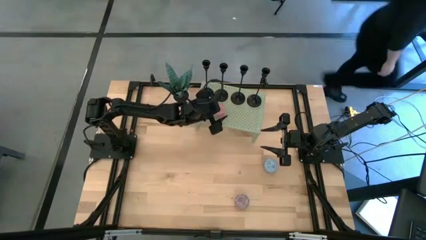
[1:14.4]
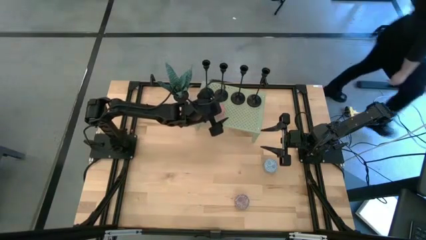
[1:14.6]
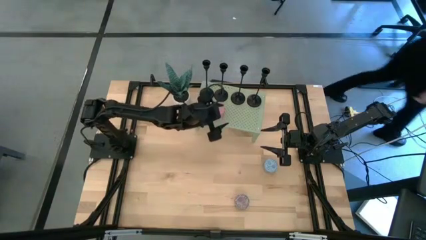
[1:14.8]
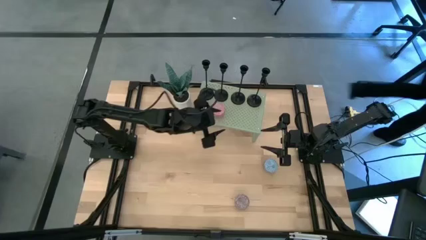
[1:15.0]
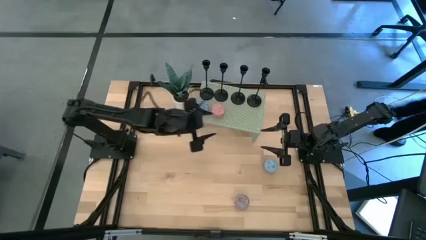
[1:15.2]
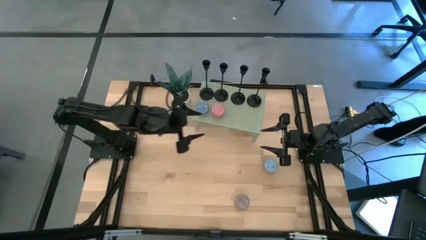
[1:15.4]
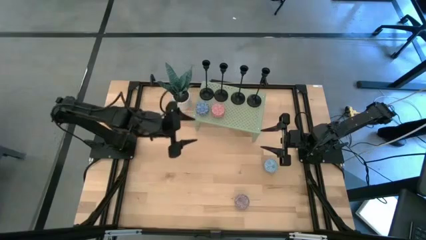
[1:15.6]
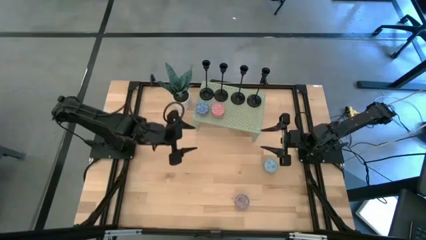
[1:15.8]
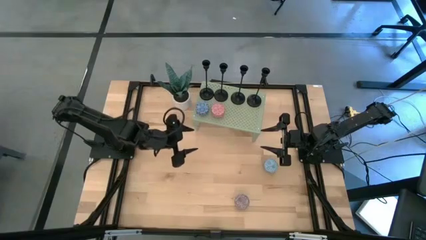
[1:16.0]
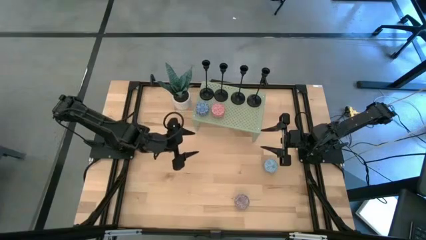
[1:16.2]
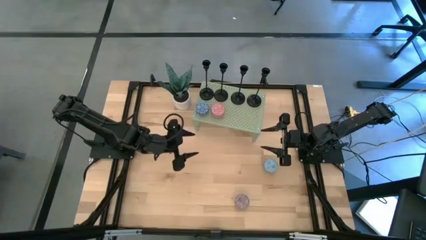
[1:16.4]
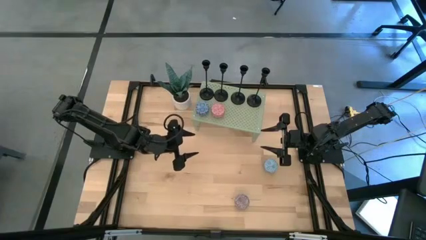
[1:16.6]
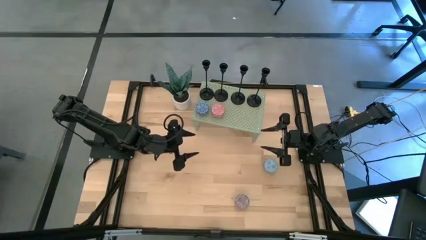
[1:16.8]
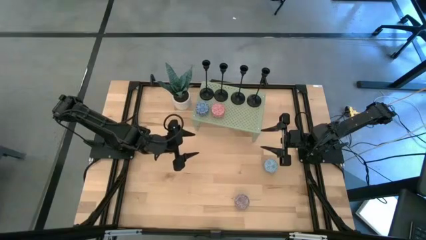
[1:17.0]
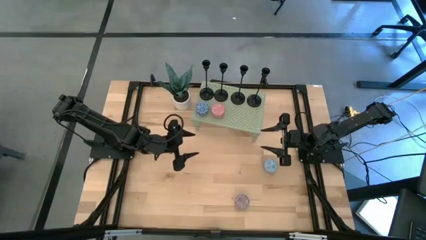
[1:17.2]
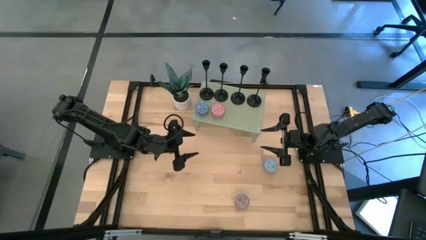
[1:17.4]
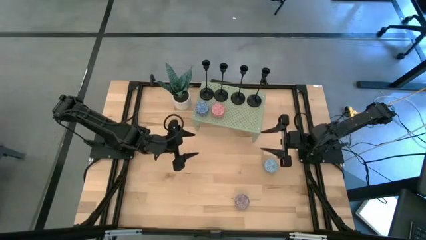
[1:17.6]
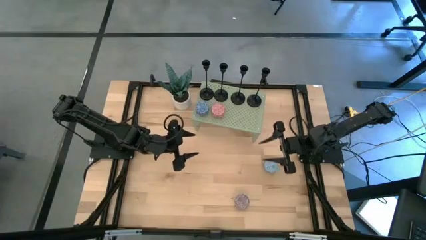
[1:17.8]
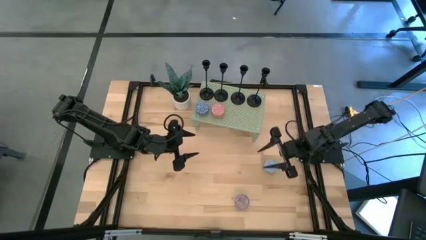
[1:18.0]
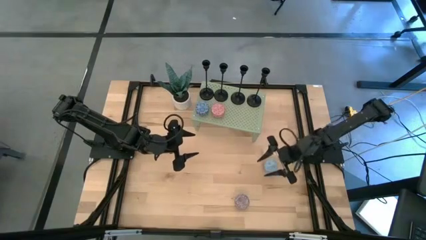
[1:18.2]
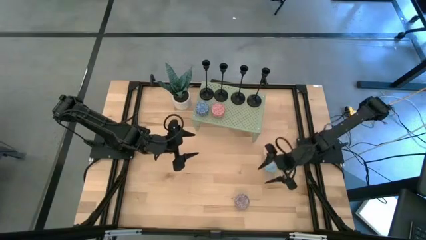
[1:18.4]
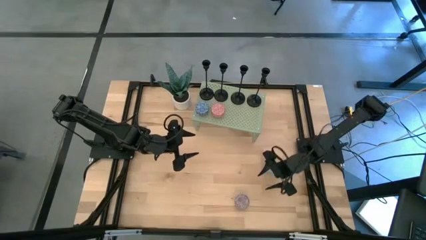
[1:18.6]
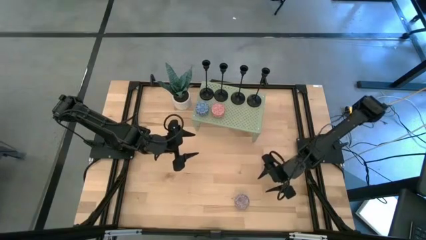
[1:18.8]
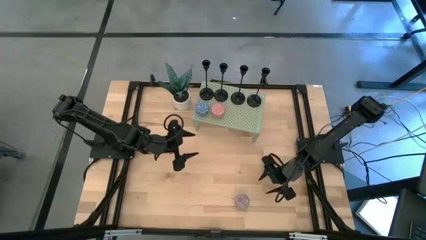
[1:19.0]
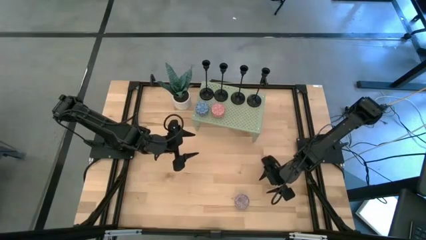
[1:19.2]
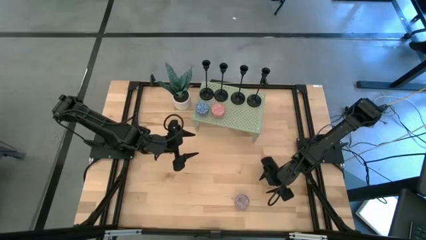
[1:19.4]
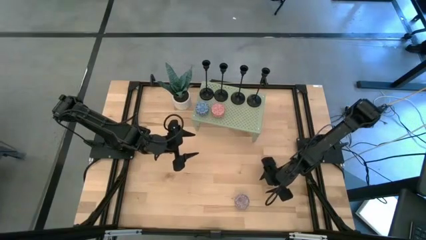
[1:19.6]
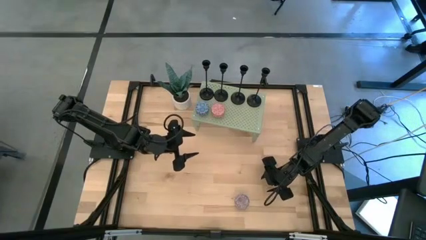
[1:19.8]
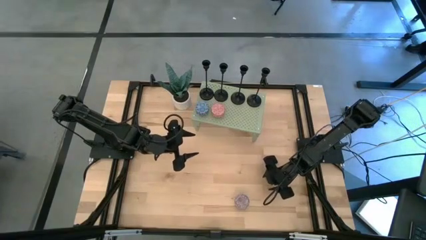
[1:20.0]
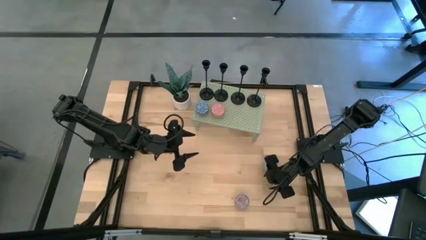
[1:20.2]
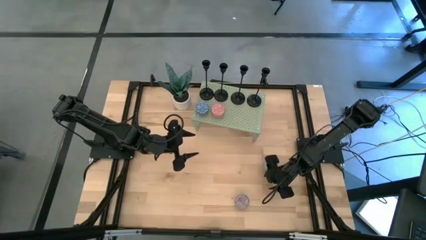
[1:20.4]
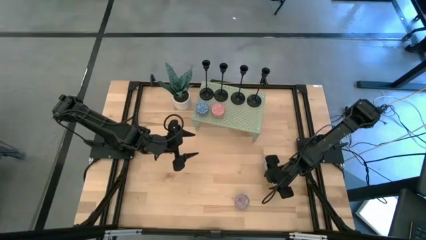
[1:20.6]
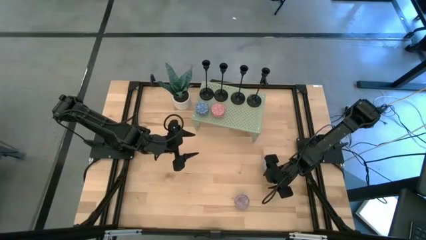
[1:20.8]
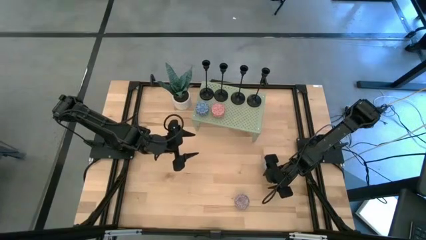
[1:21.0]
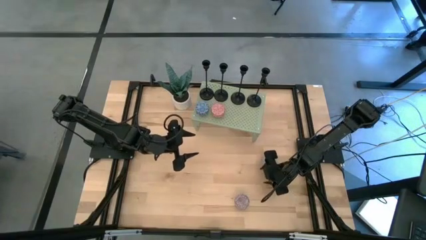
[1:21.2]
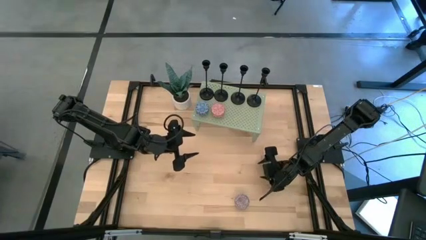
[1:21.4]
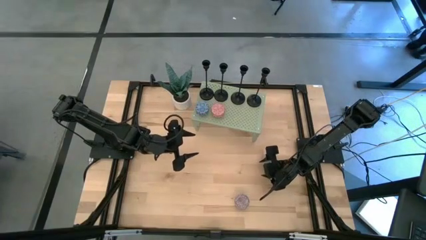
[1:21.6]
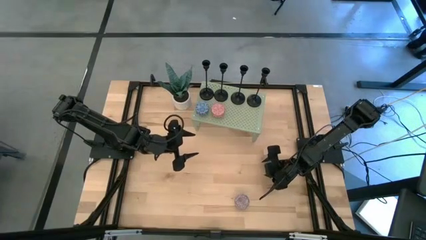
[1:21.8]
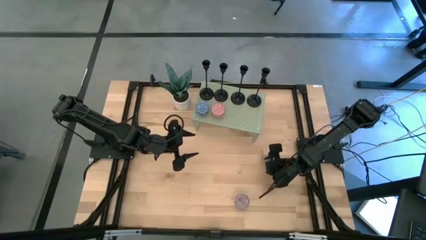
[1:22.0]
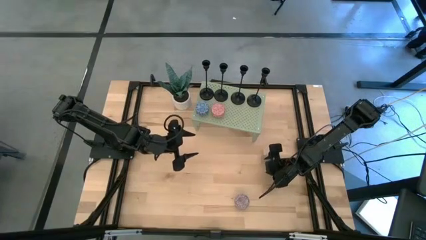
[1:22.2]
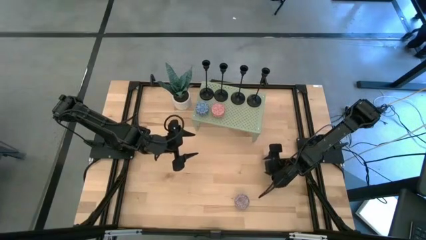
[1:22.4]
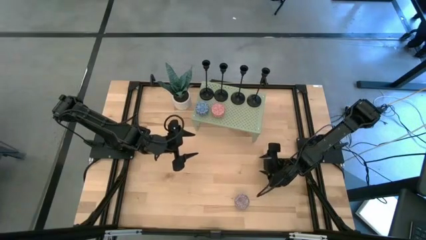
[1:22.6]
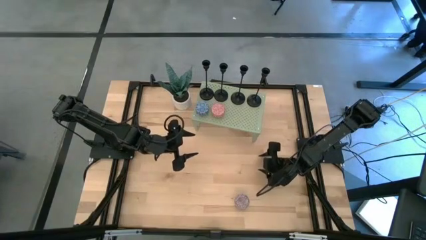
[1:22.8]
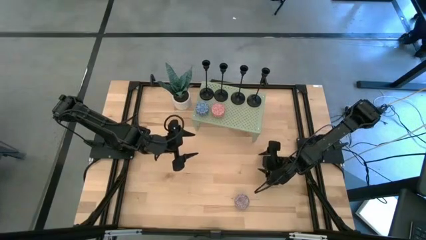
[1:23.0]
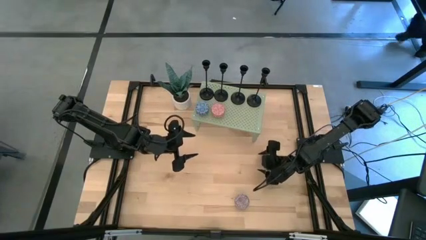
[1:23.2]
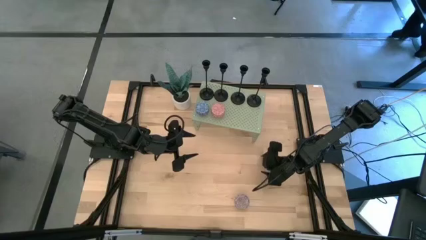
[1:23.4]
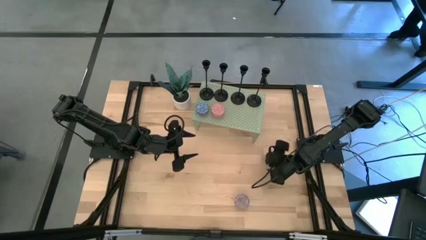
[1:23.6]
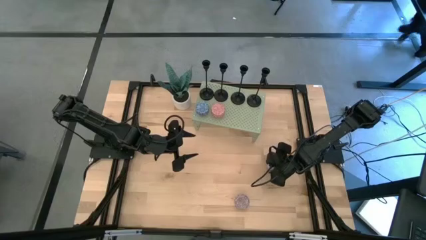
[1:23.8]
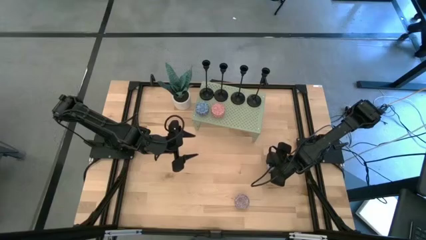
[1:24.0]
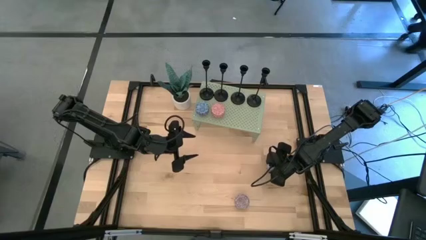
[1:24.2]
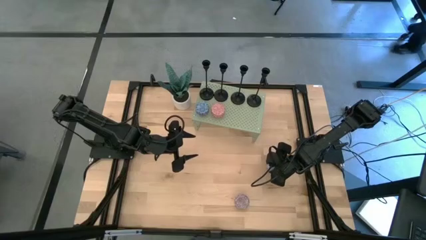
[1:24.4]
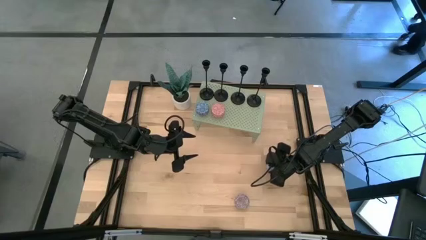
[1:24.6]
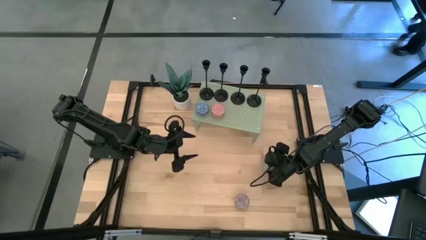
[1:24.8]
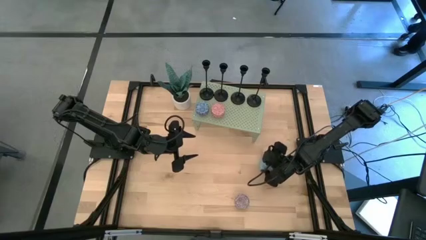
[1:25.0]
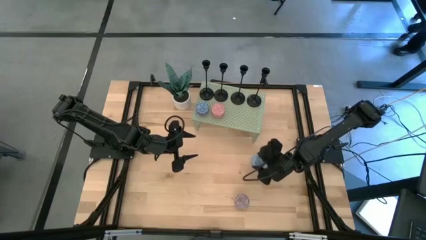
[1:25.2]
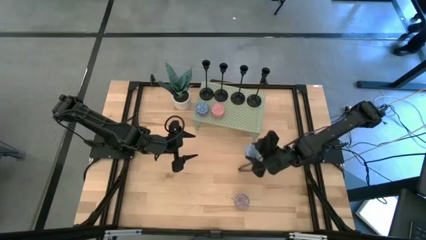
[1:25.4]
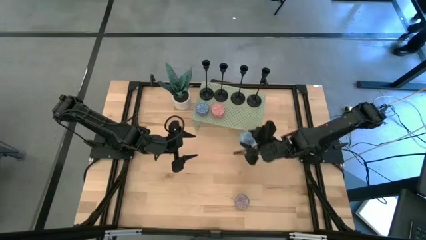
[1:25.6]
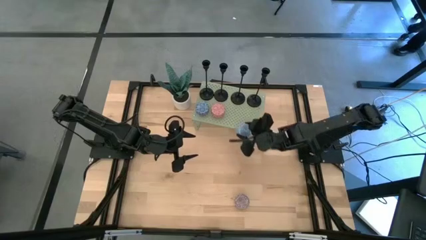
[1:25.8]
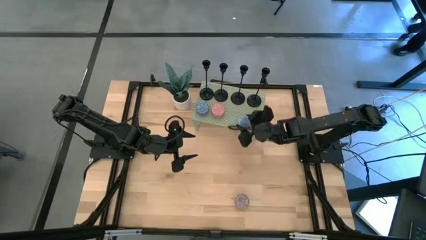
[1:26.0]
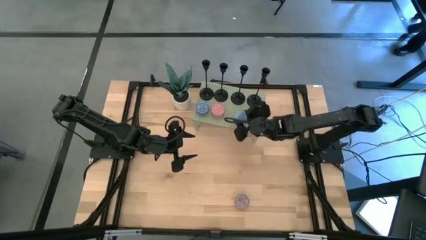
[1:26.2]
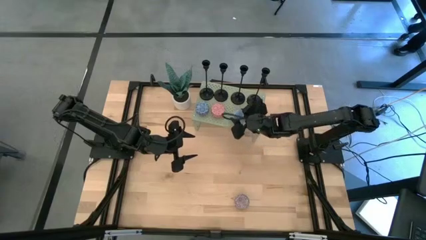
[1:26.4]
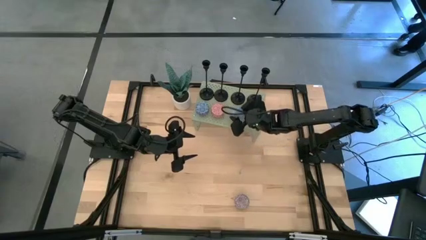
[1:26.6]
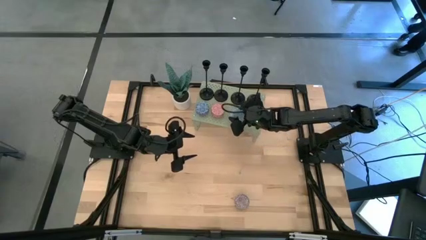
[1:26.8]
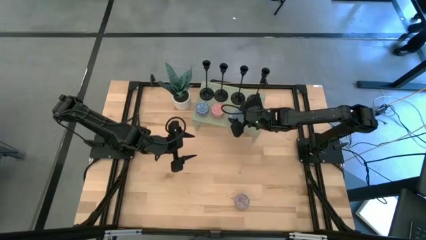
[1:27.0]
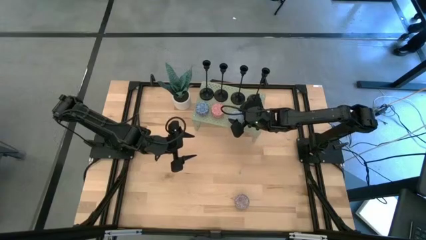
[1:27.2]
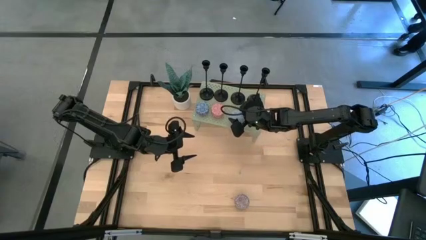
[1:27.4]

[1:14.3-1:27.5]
Task: Pick & Place candle stick holders
Put the light blue scented candle on the shelf aligned with the other pink scented candle
